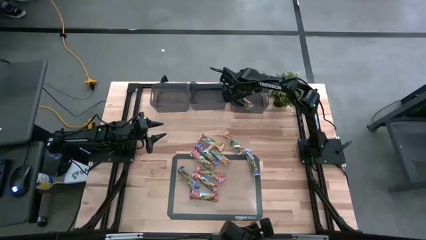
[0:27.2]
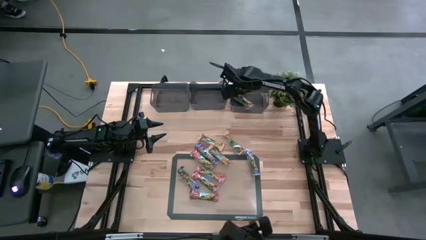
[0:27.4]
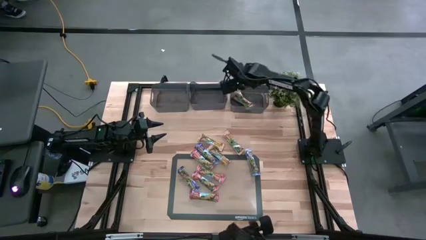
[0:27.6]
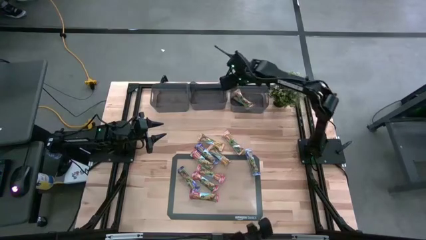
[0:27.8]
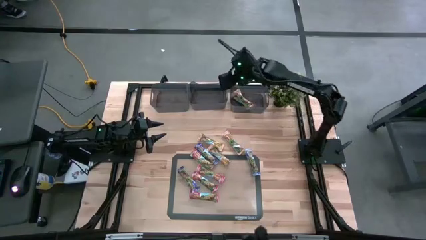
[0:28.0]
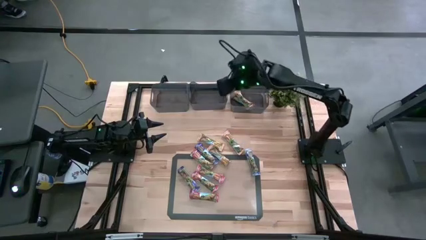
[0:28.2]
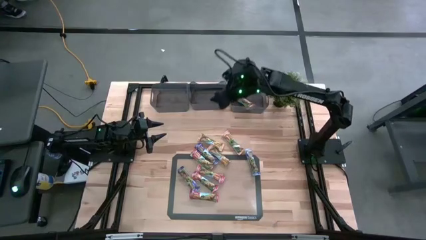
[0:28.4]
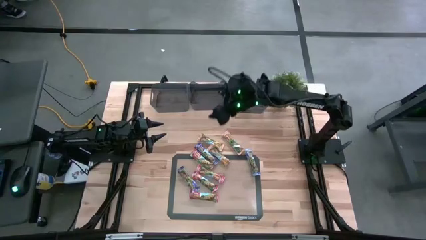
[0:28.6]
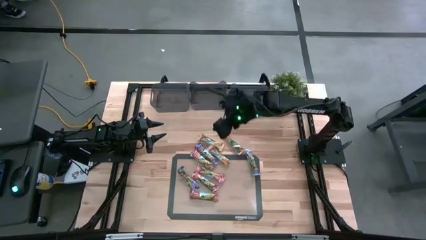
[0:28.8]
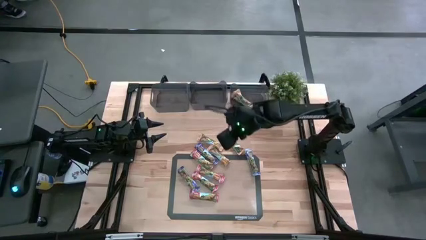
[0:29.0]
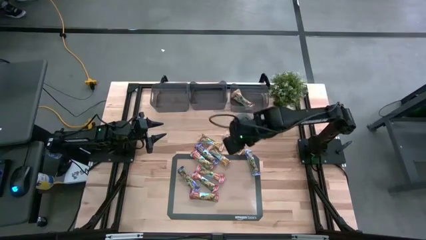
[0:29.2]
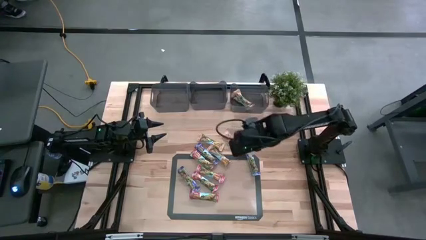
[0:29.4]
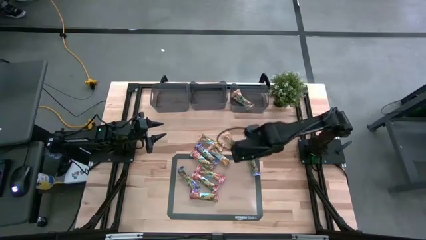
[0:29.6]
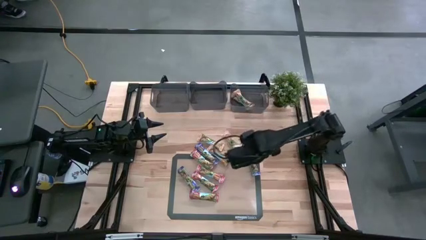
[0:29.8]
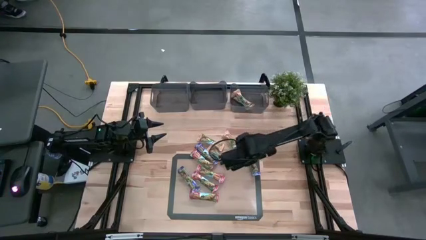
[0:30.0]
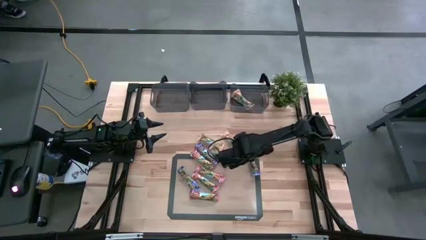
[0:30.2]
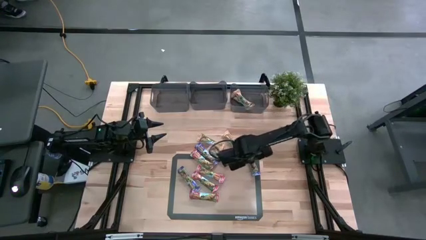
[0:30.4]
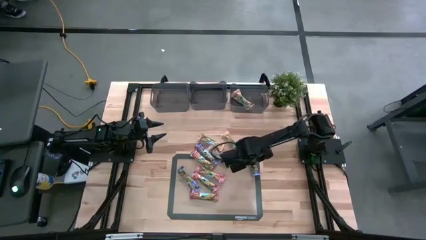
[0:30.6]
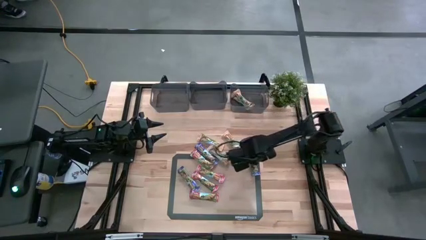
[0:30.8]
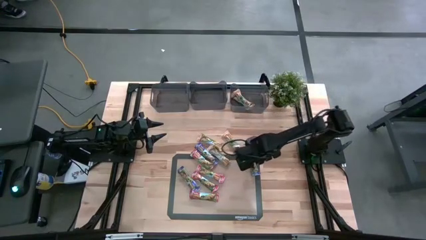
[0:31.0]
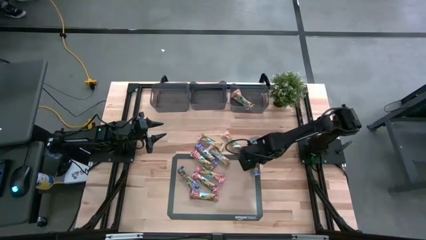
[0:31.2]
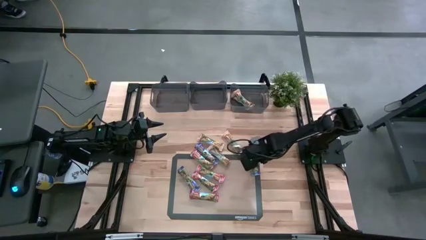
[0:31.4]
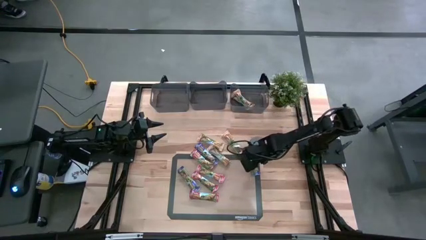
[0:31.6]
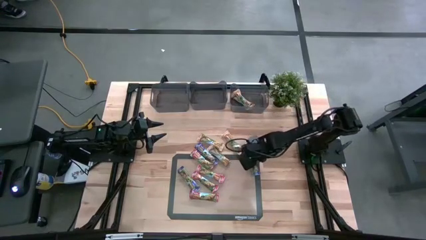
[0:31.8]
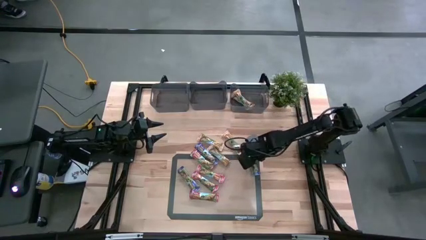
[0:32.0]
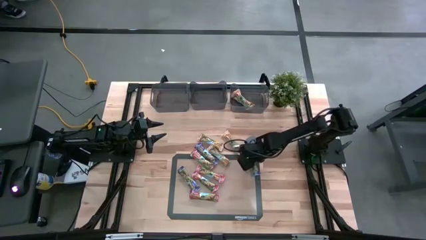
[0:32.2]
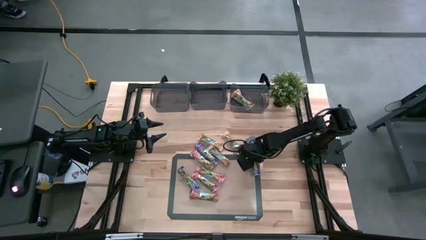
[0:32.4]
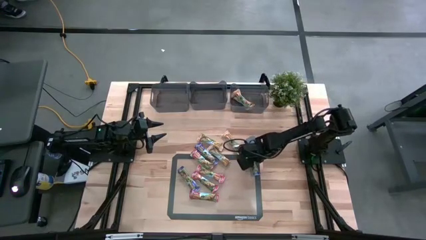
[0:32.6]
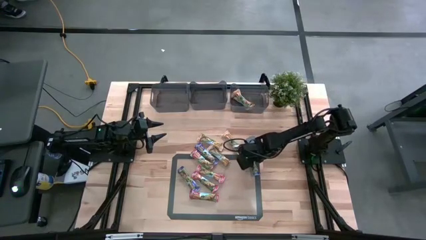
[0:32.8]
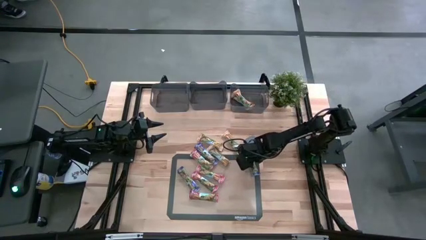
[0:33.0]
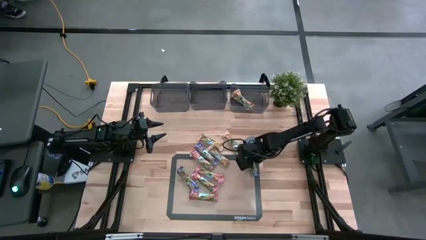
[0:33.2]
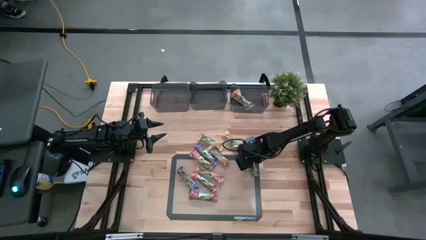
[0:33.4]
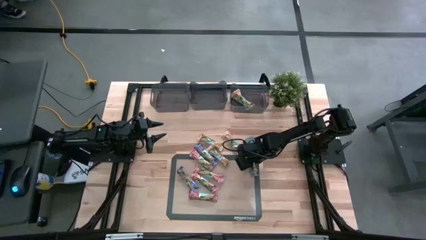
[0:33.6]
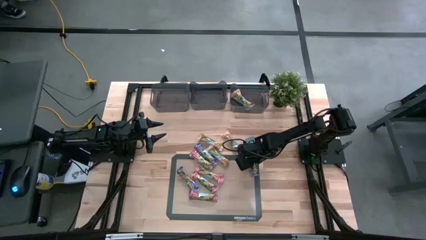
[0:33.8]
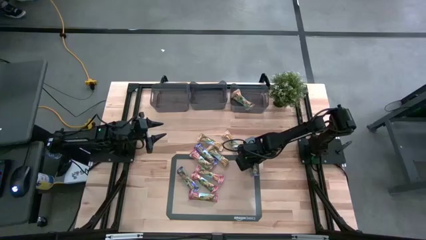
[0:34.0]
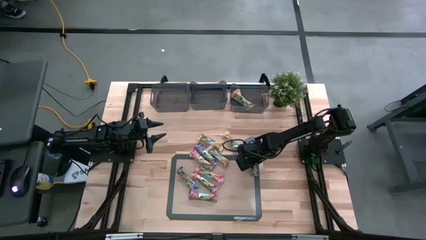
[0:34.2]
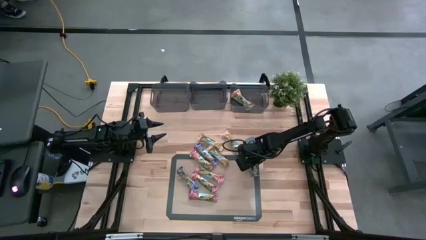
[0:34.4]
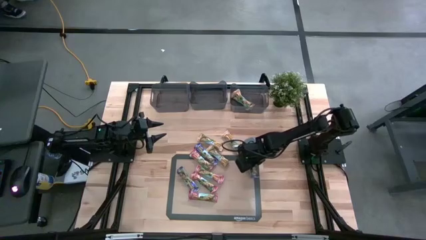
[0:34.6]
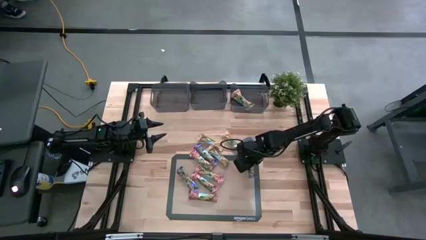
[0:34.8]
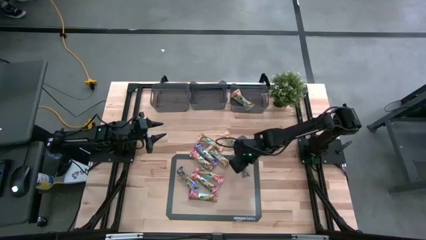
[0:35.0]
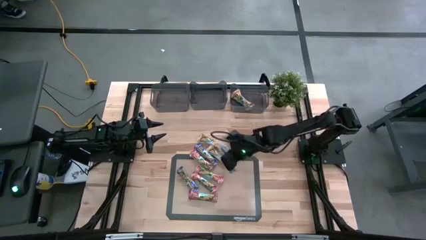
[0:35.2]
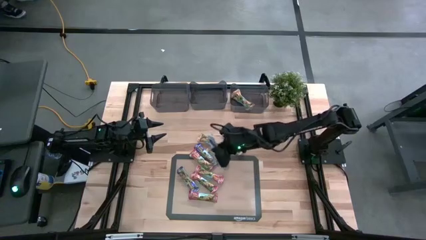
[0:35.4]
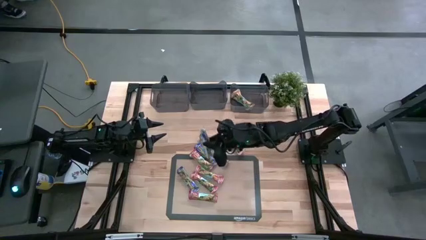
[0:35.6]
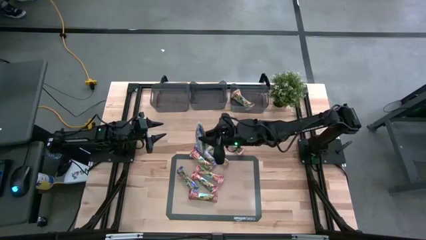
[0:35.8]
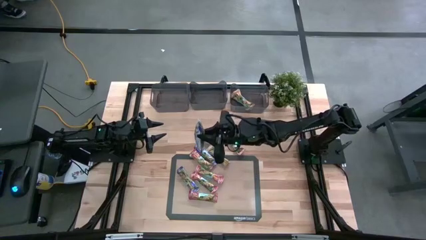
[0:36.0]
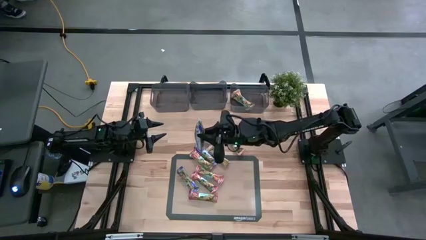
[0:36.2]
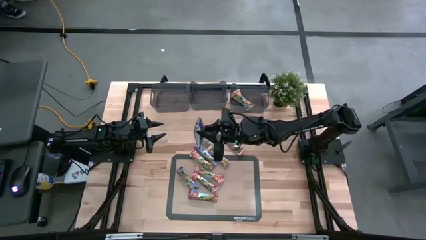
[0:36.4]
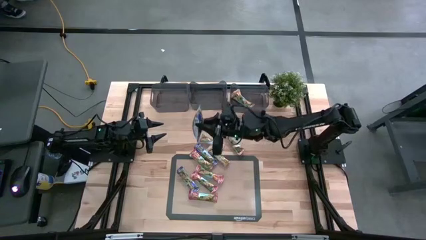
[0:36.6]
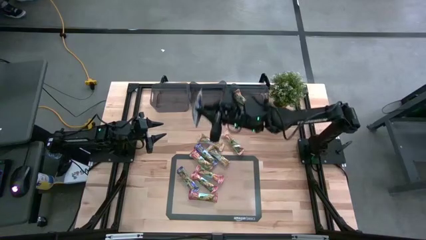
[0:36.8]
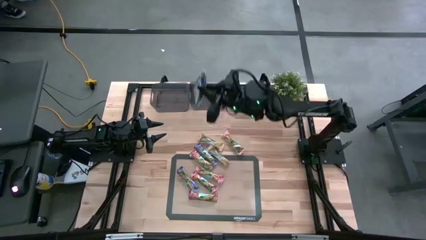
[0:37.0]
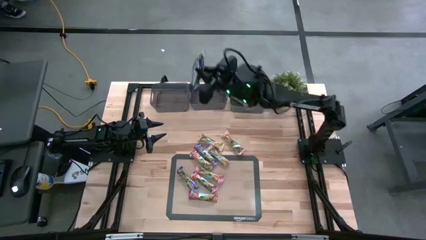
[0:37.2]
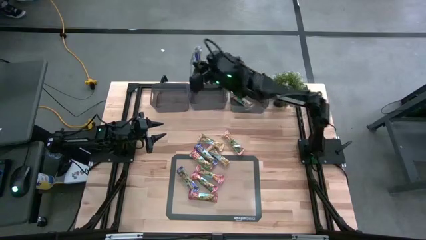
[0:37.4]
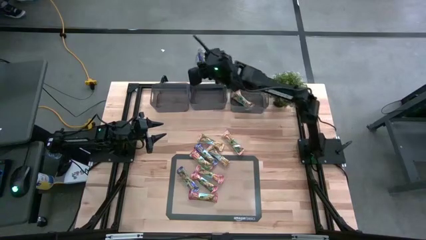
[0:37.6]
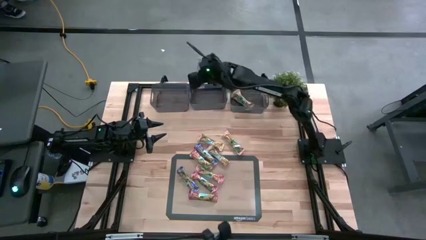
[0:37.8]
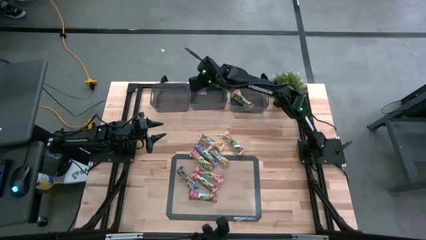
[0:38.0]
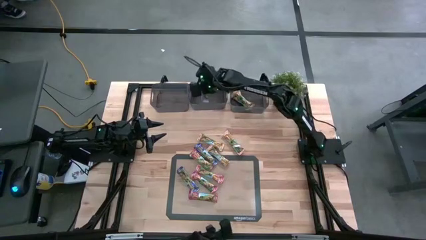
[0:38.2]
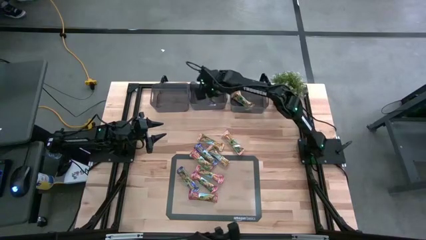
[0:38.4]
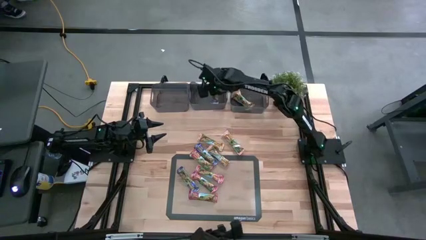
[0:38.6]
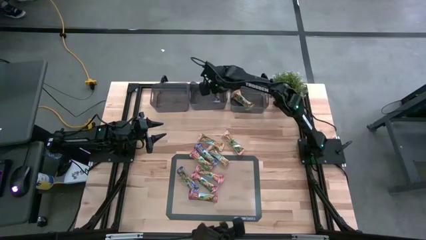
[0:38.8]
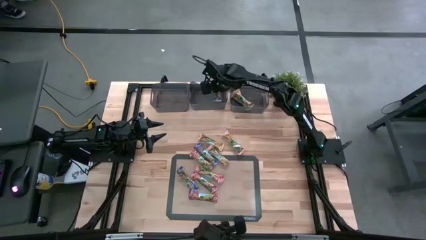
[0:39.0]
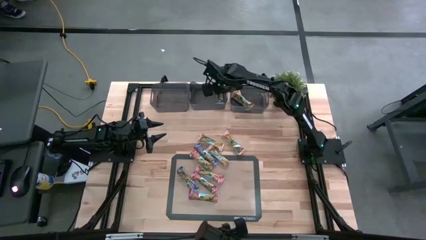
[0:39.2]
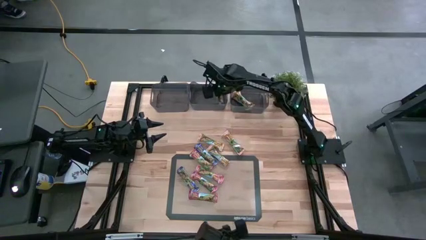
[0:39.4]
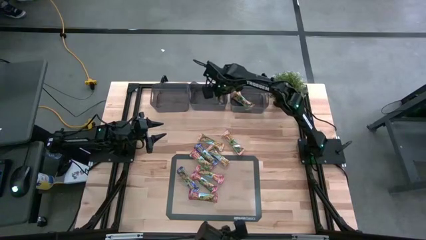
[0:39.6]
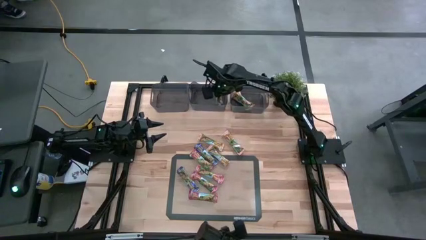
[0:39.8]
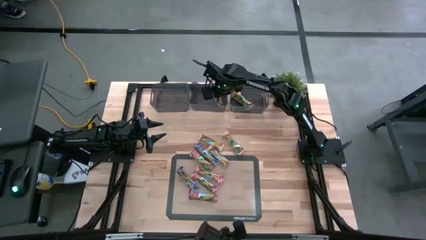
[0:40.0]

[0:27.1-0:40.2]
Task: Pick and place Granola Bars by type
Put the blue granola bar into the middle black bin

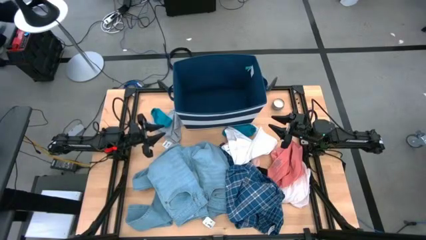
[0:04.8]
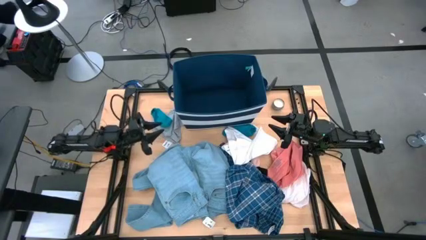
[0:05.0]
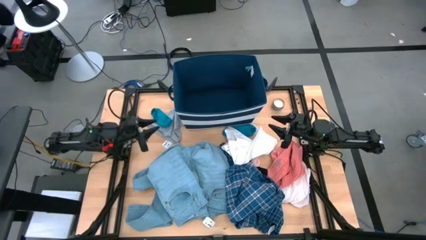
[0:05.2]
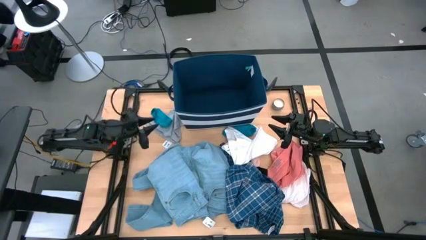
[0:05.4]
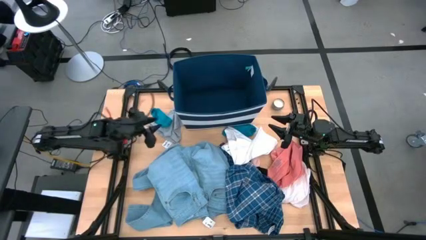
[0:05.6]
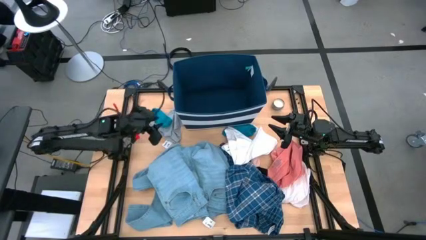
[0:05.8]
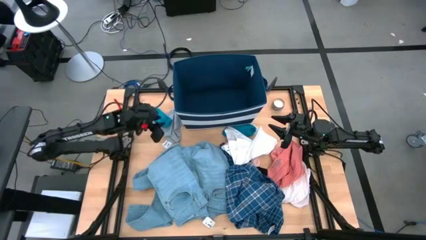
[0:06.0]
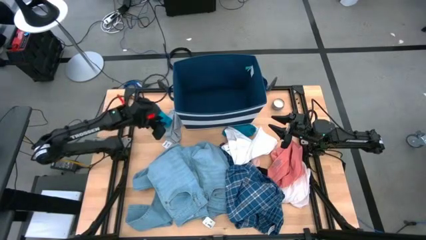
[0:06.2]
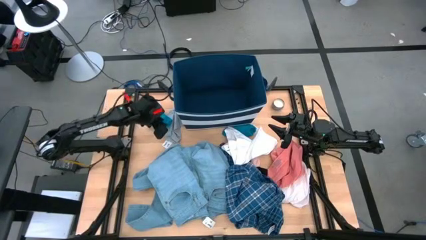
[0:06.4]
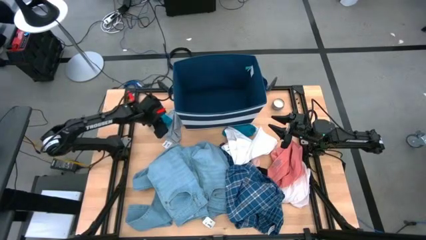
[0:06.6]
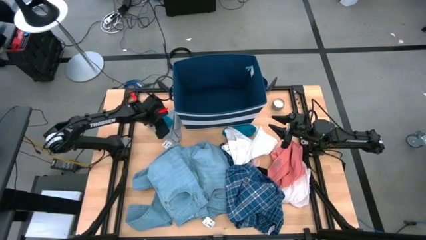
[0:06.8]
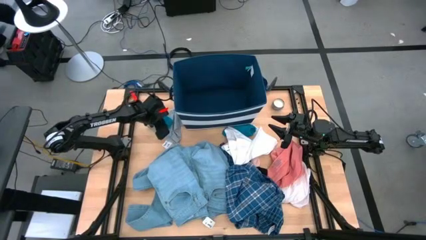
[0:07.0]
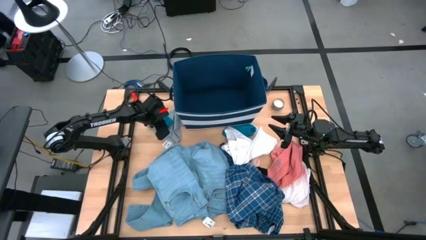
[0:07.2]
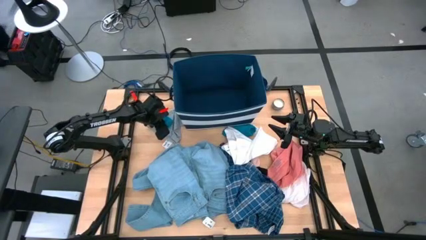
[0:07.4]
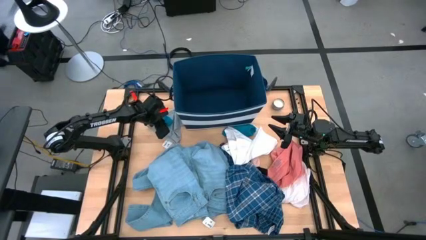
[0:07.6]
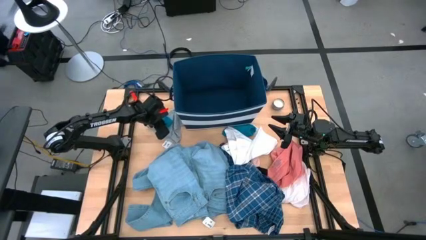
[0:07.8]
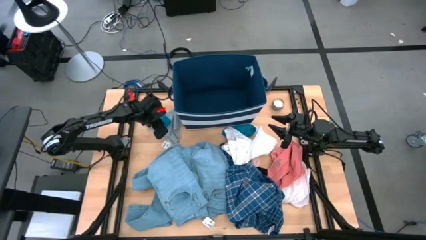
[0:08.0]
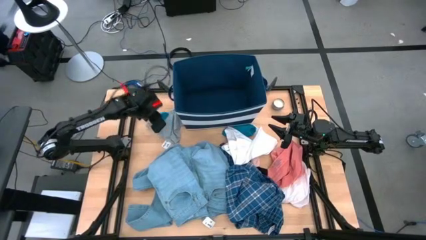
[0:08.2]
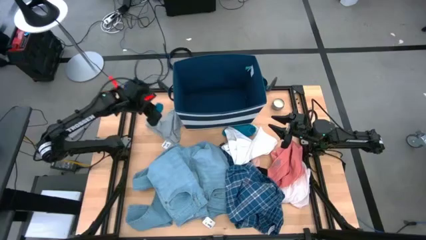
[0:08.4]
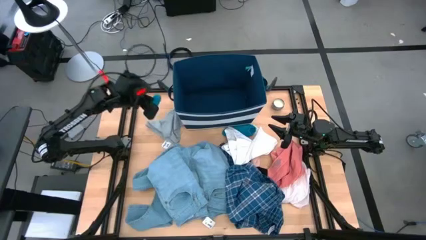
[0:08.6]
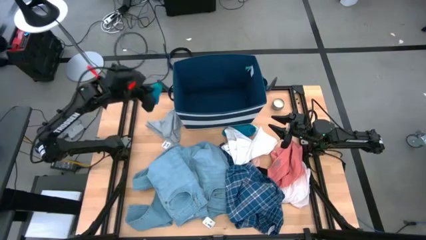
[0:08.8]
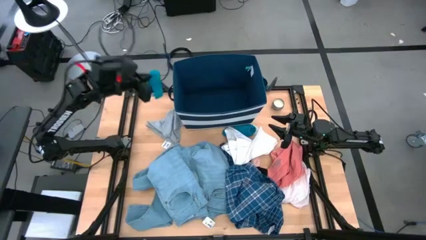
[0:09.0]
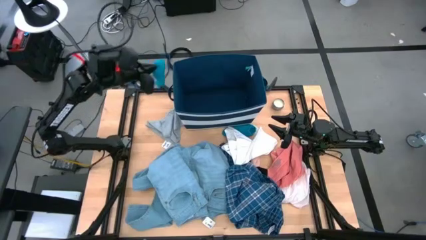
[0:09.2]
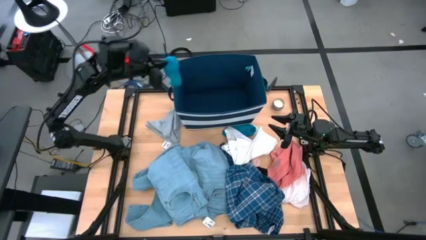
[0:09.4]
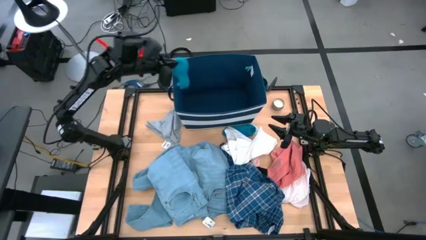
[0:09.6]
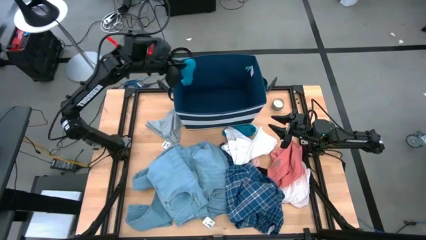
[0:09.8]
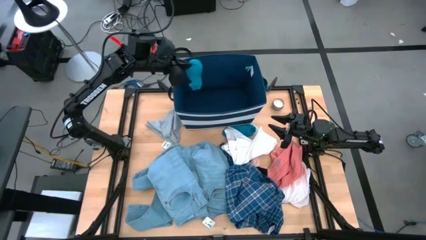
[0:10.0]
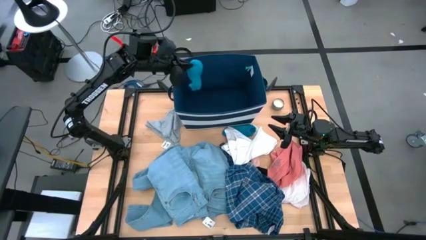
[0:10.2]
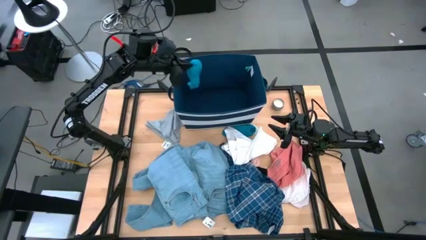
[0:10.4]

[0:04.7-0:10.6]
Task: Sort clothes
Put the blue sock into the blue organizer bin
